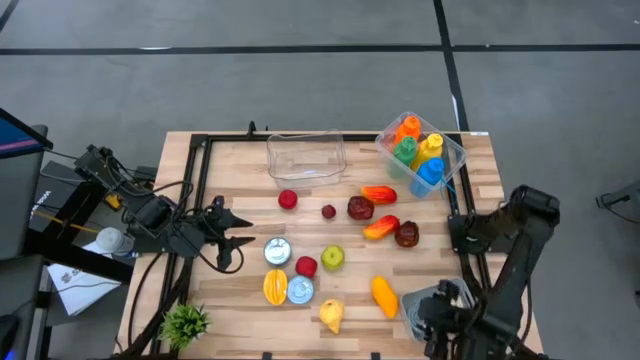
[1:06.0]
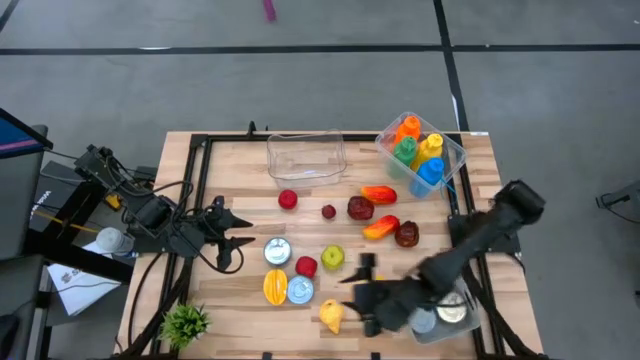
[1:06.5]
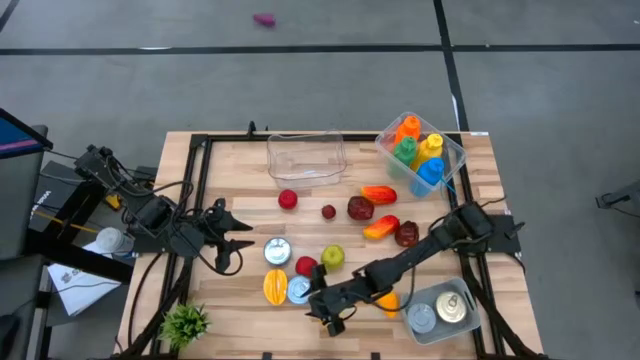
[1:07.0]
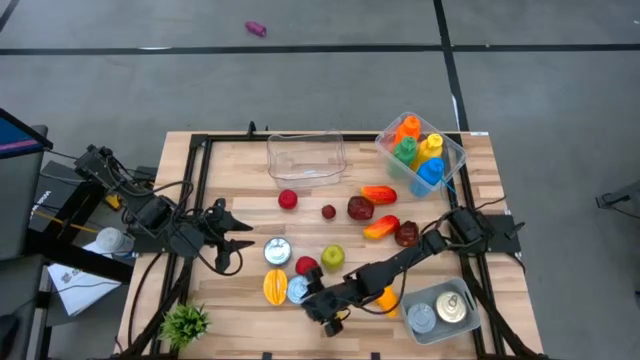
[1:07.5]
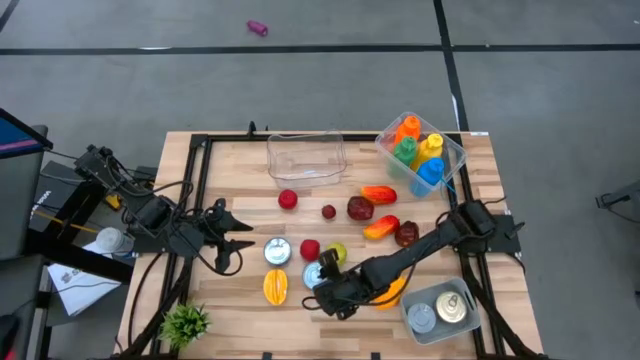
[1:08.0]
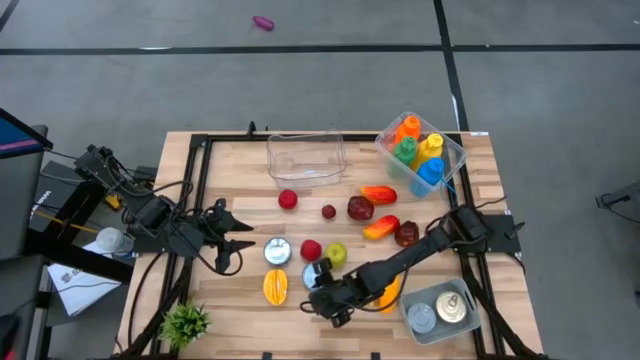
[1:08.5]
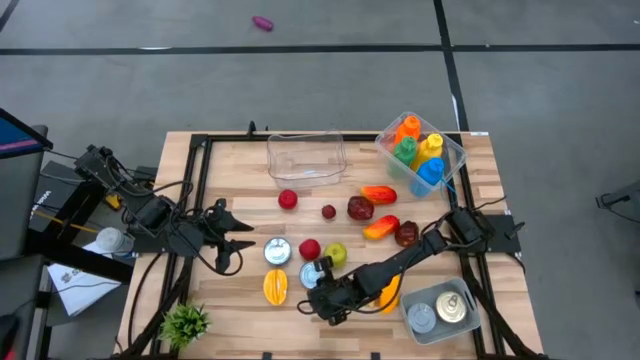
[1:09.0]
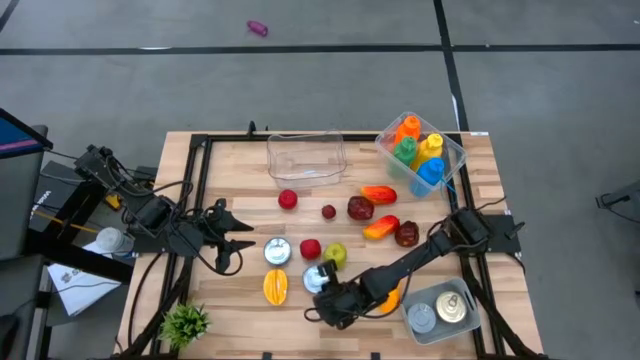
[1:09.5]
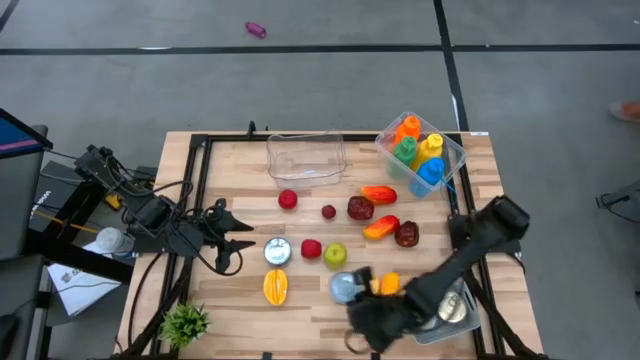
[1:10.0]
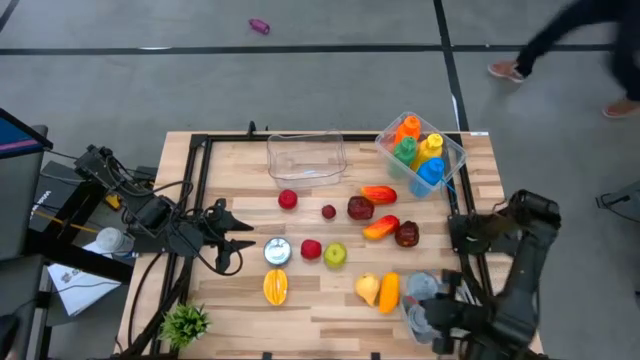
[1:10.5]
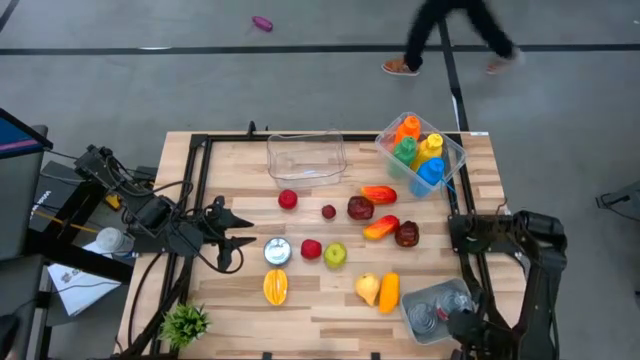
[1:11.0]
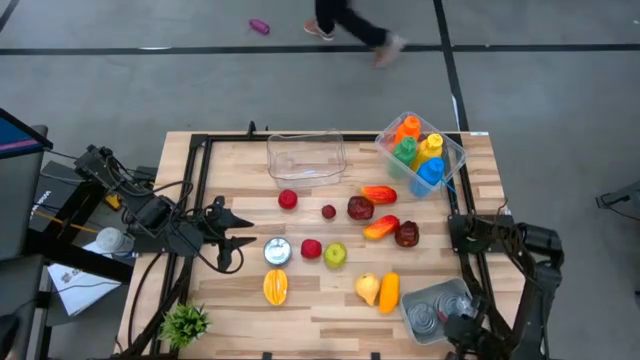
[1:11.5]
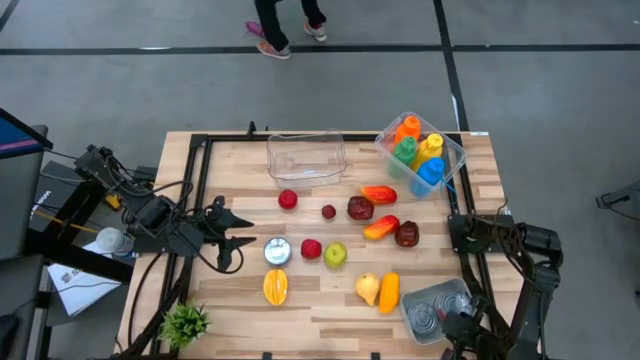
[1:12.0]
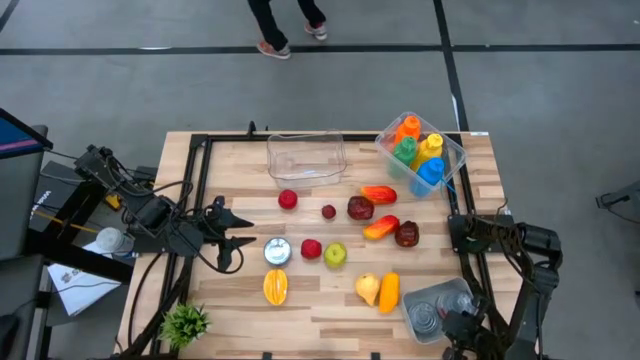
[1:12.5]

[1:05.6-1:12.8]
Task: Pick & Place Food Item
Put the red tuna can into the gray bin

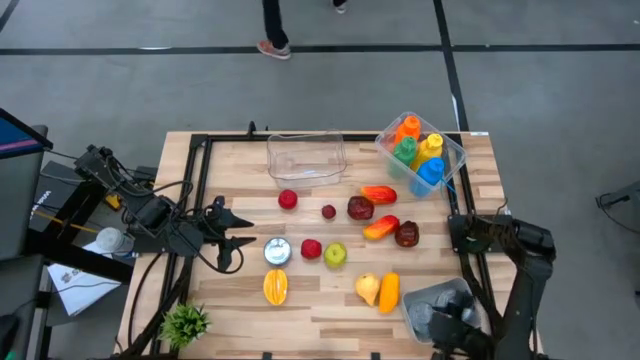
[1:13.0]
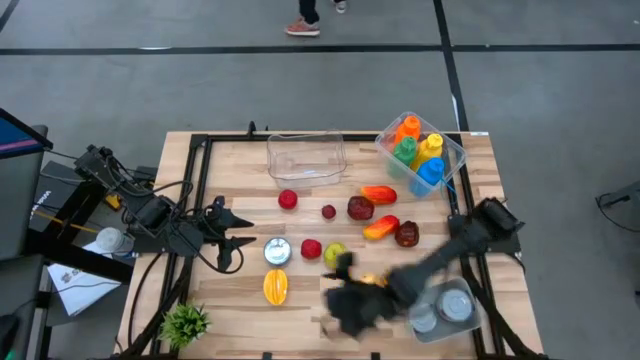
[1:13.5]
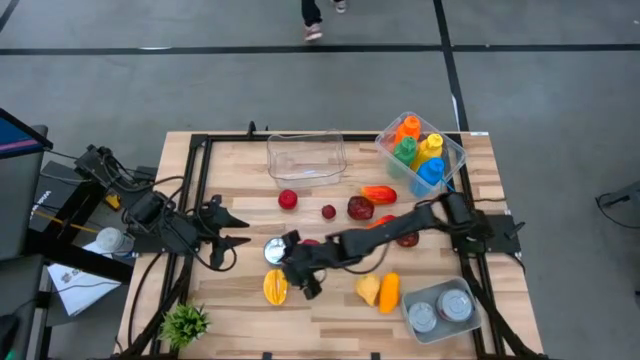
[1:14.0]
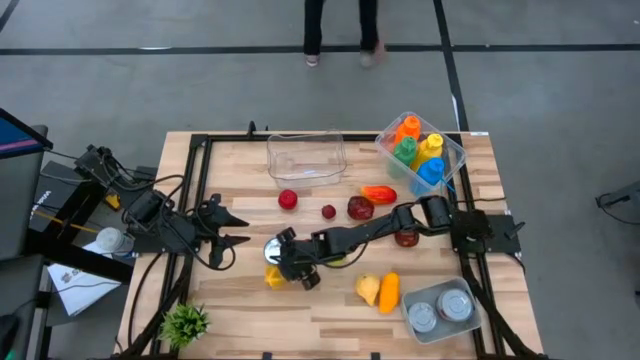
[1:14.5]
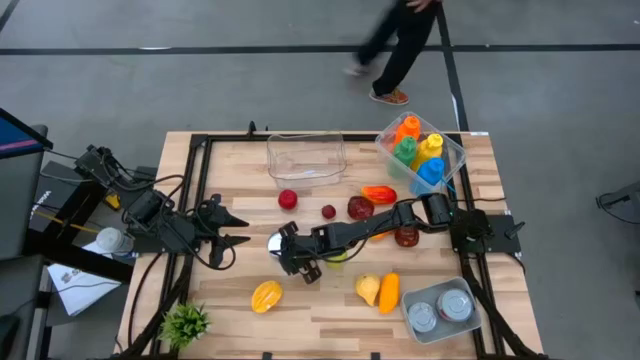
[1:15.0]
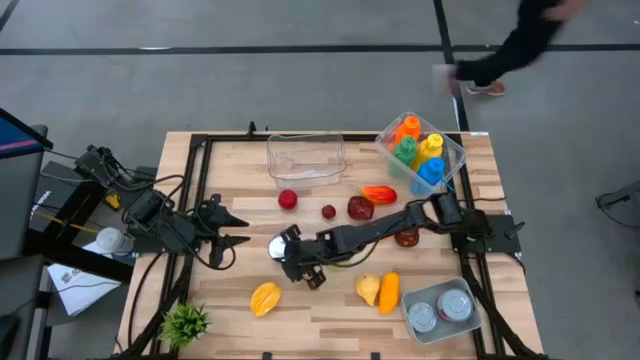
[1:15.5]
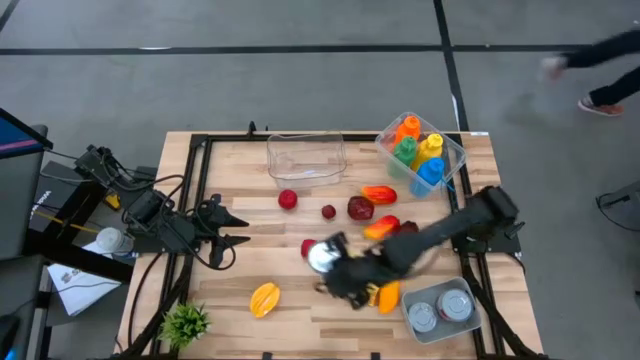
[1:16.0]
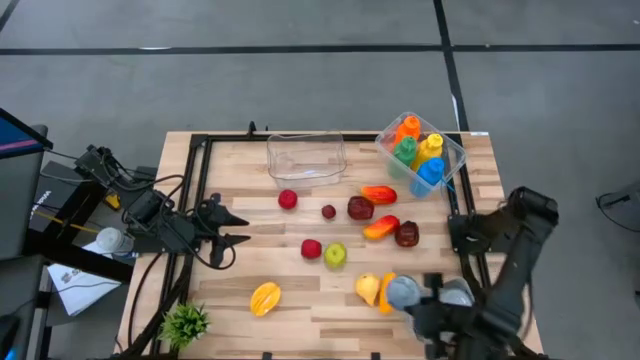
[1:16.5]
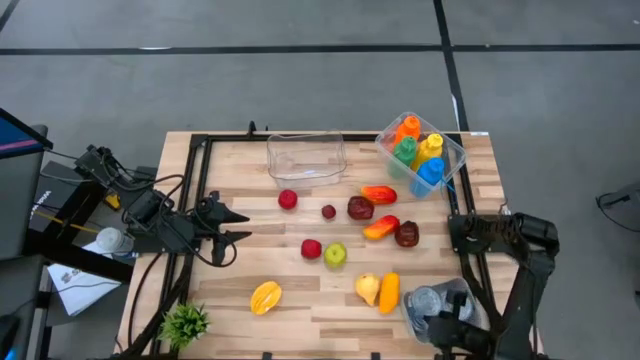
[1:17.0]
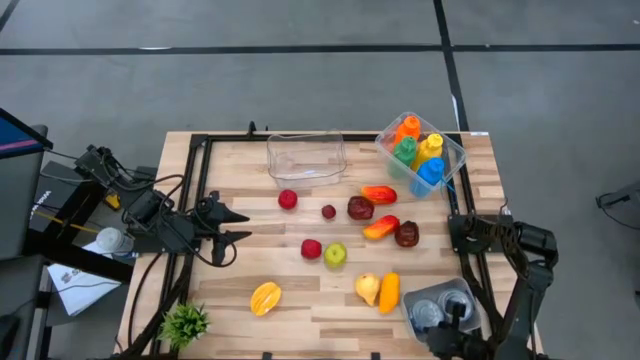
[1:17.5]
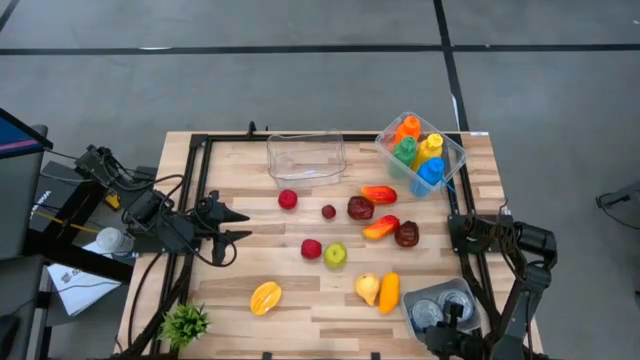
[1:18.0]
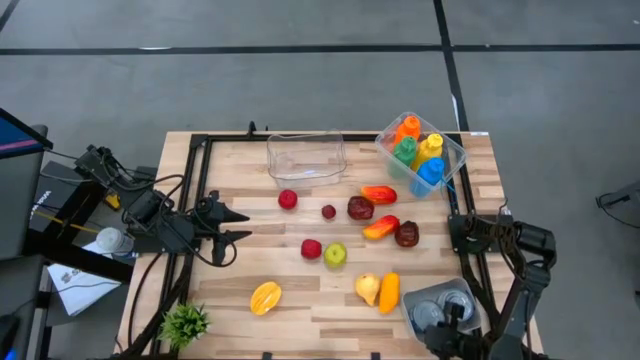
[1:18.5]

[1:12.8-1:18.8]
Put the blue tuna can into the gray bin

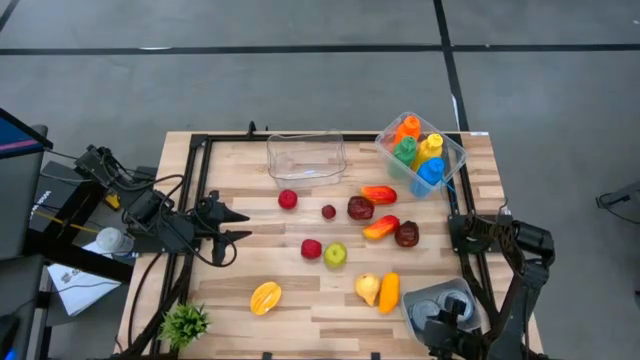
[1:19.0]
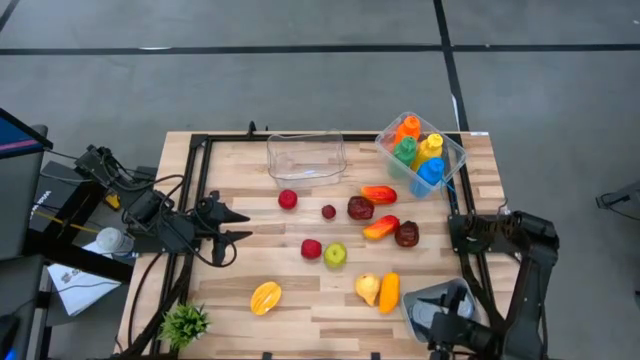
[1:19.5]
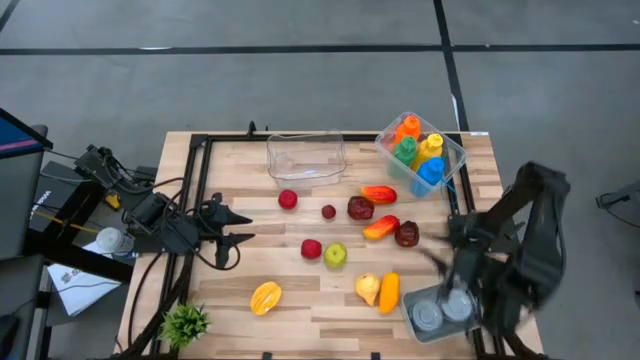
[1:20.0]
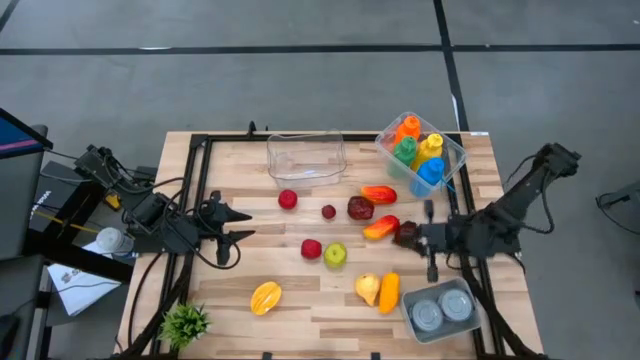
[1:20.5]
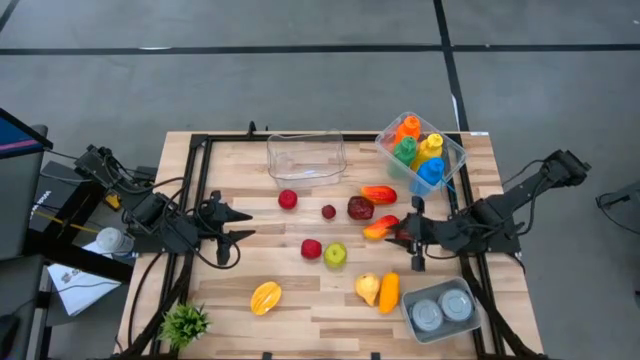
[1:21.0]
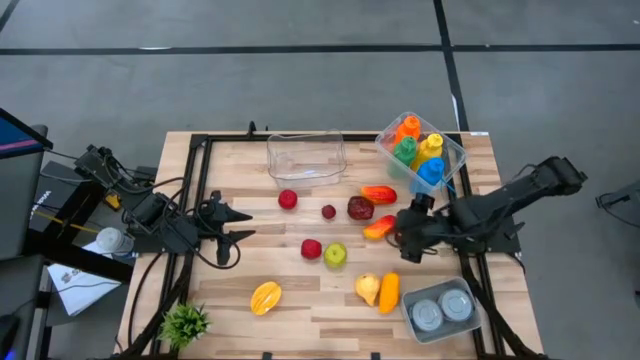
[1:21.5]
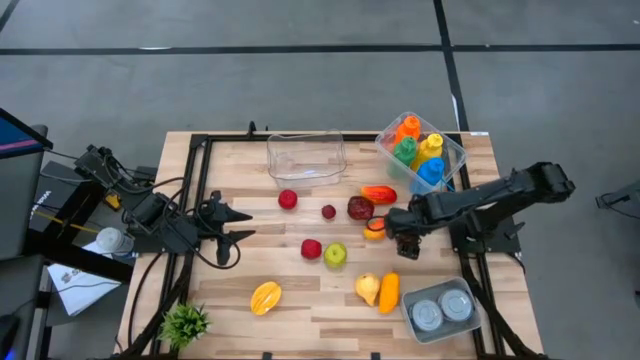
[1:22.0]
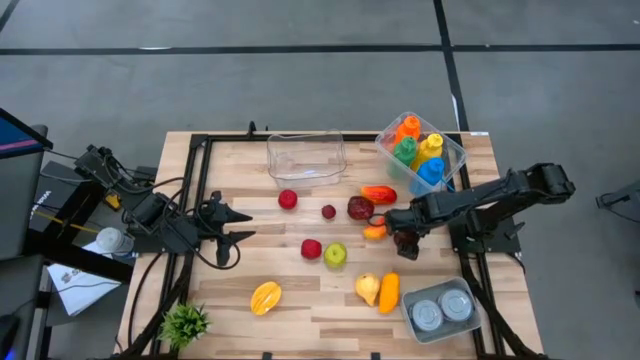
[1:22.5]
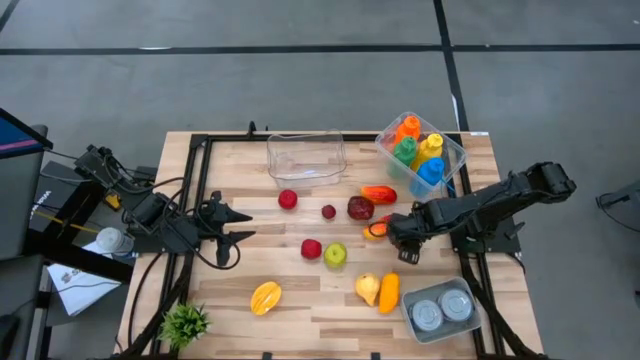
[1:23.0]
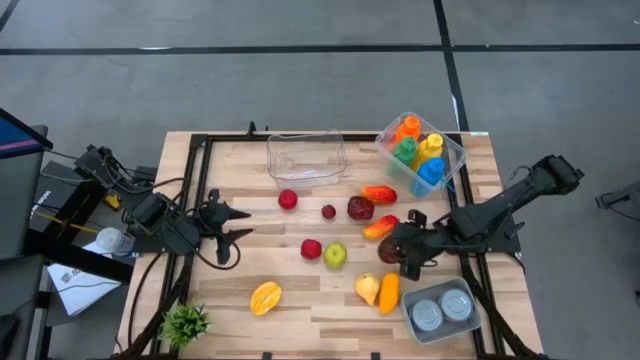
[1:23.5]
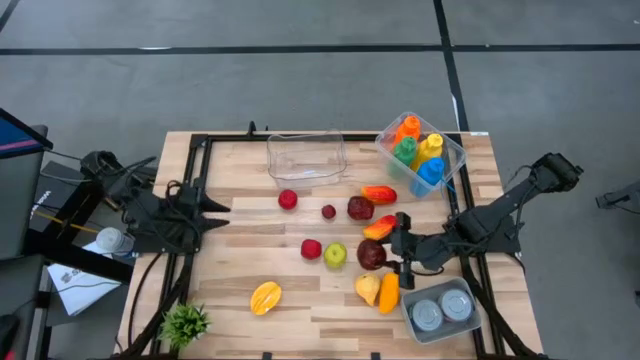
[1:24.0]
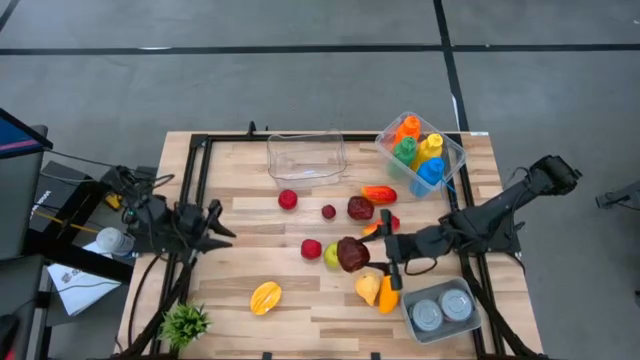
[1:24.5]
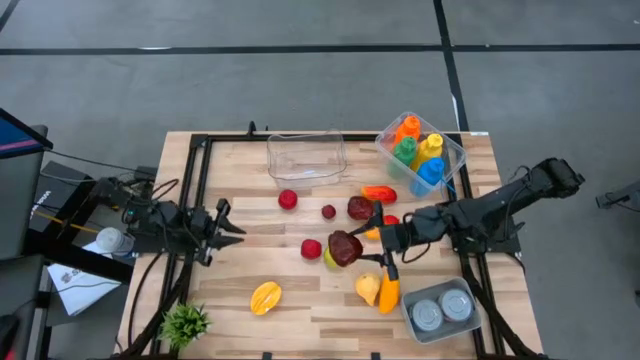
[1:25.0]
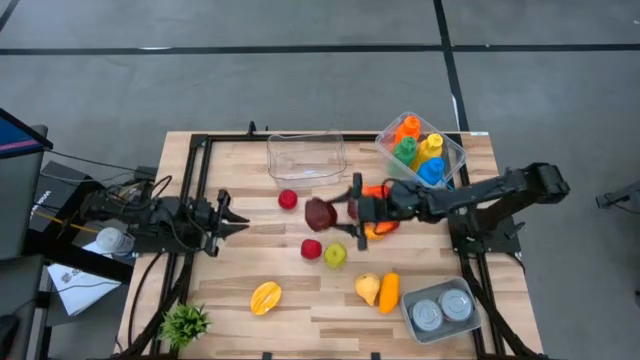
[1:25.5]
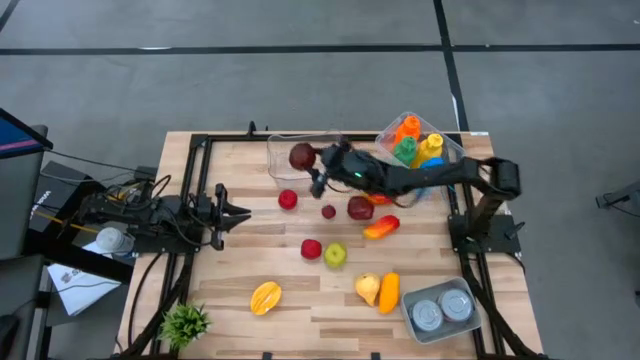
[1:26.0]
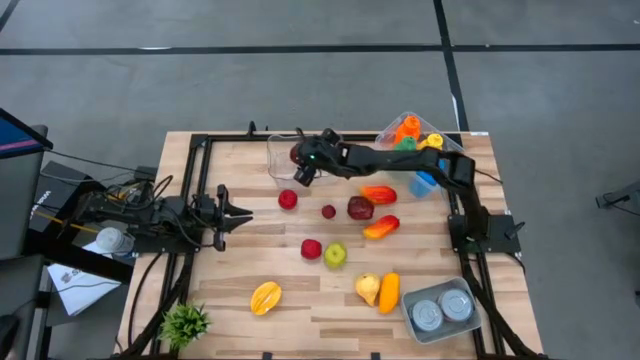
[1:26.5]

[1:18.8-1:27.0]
Put the bottom red apple into the transparent bin
